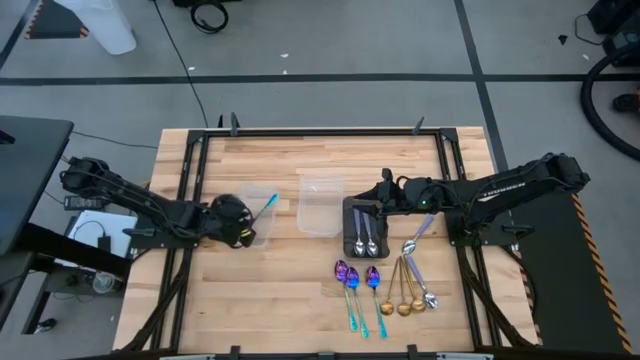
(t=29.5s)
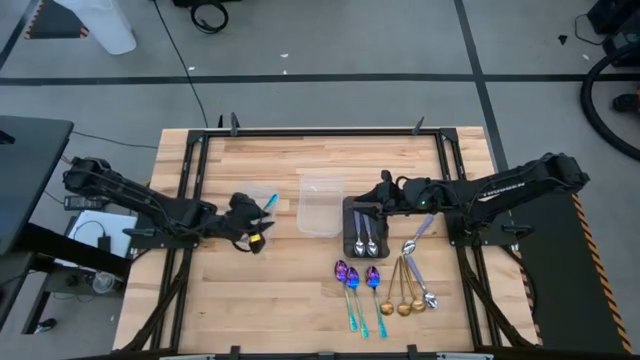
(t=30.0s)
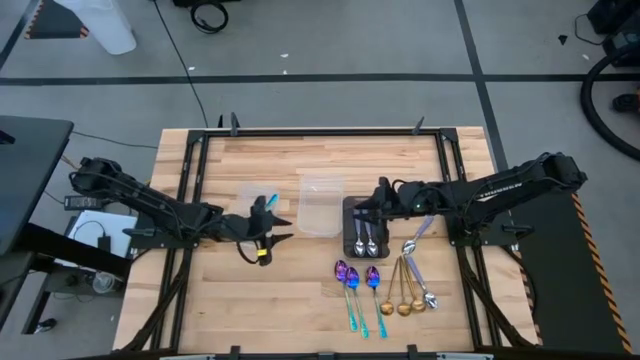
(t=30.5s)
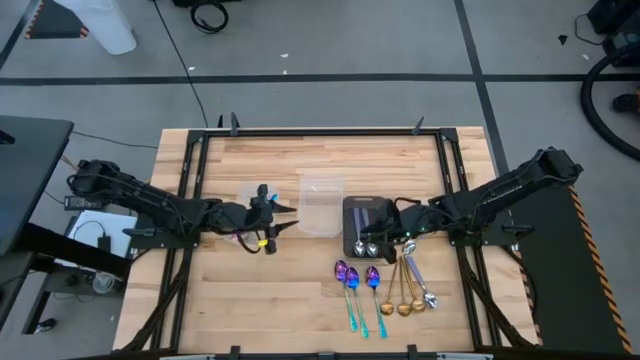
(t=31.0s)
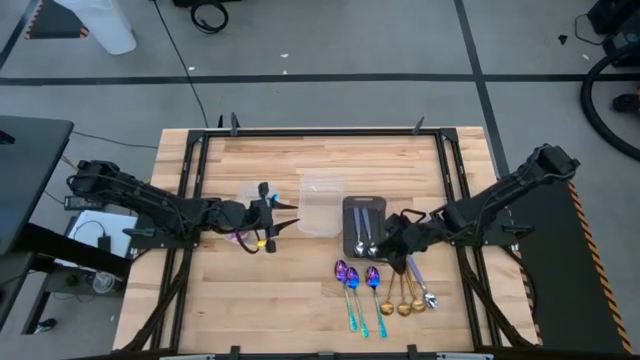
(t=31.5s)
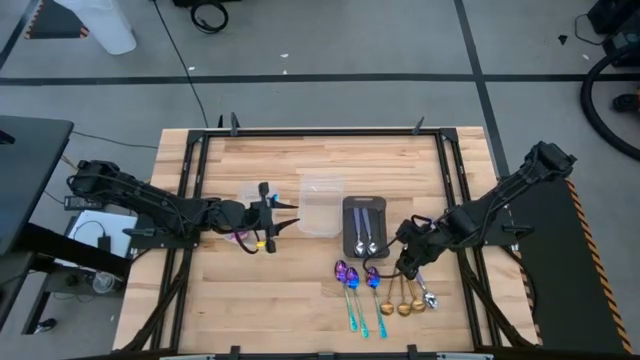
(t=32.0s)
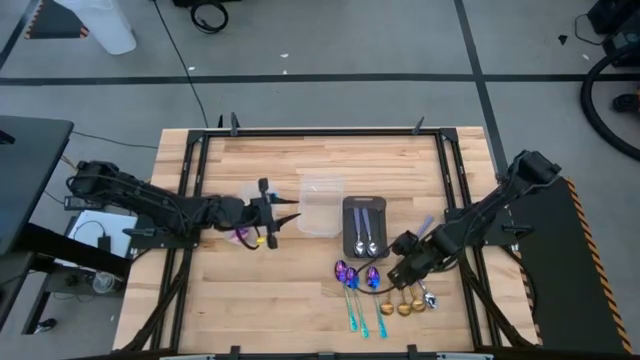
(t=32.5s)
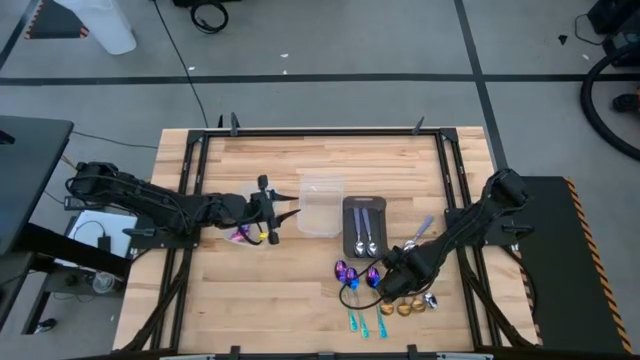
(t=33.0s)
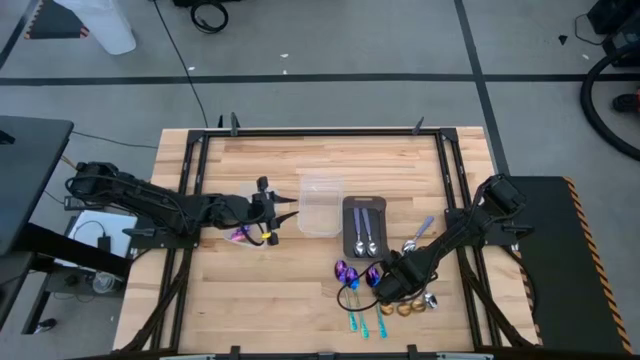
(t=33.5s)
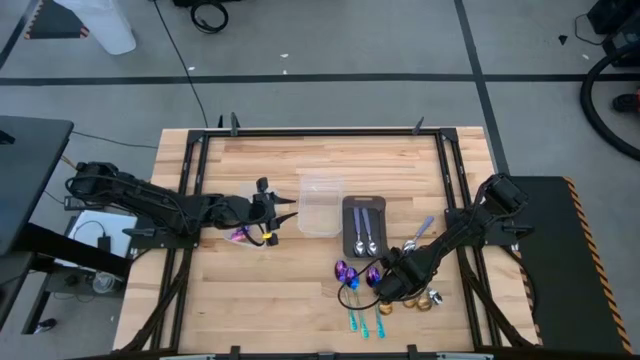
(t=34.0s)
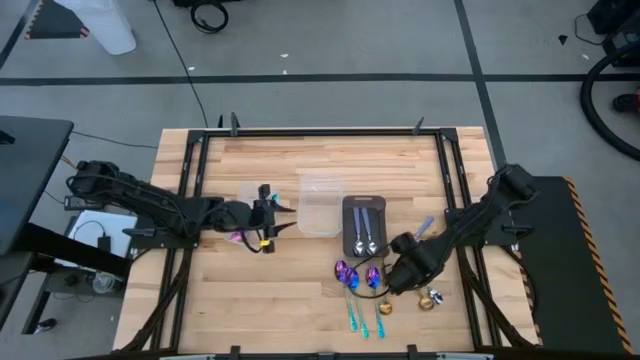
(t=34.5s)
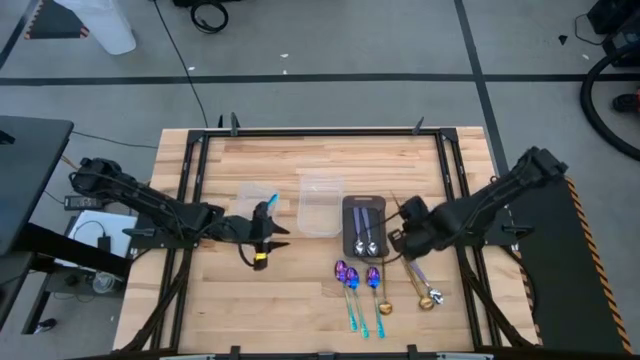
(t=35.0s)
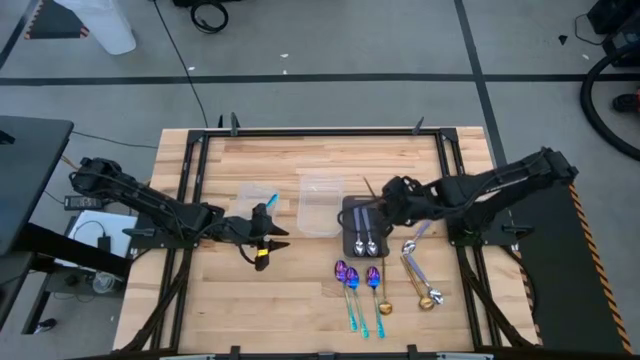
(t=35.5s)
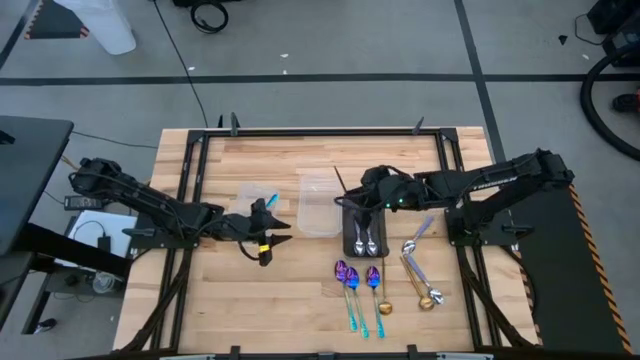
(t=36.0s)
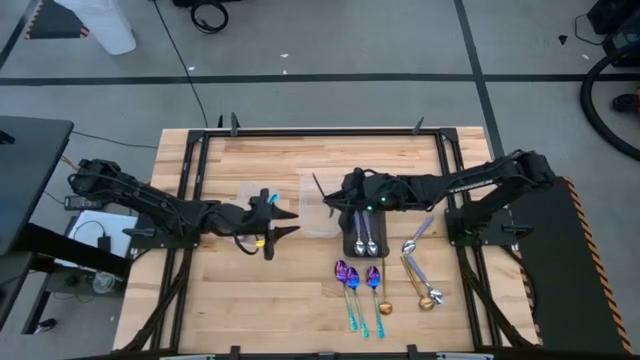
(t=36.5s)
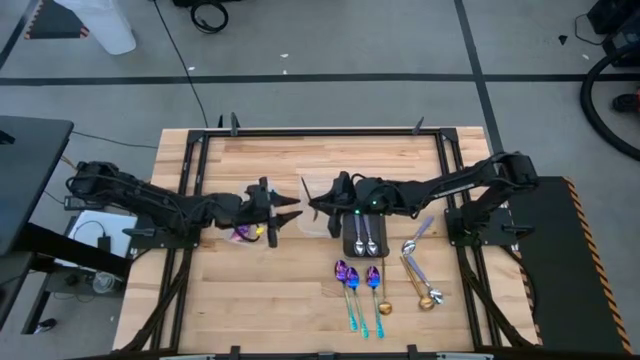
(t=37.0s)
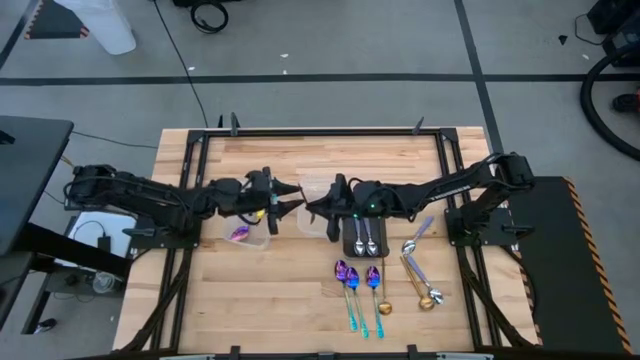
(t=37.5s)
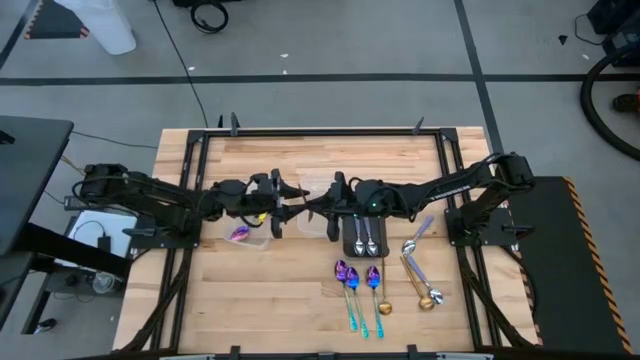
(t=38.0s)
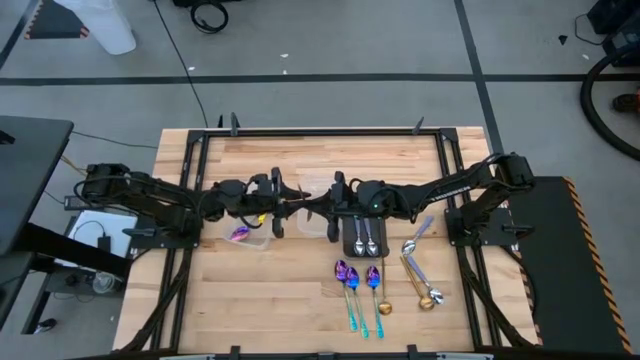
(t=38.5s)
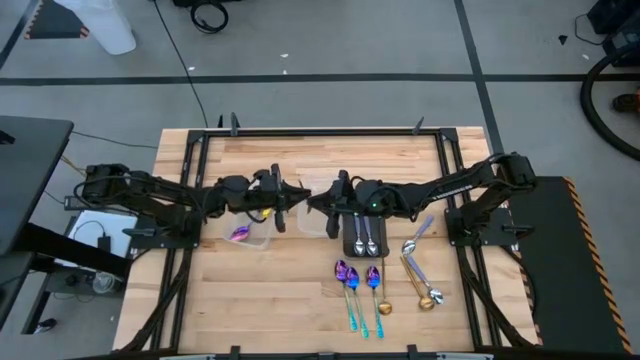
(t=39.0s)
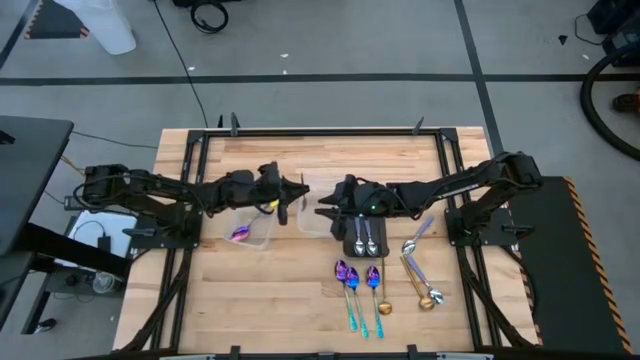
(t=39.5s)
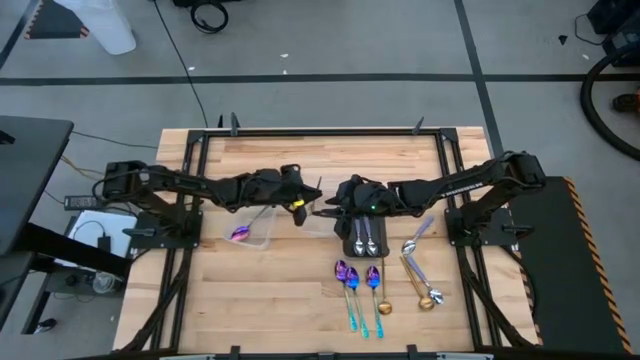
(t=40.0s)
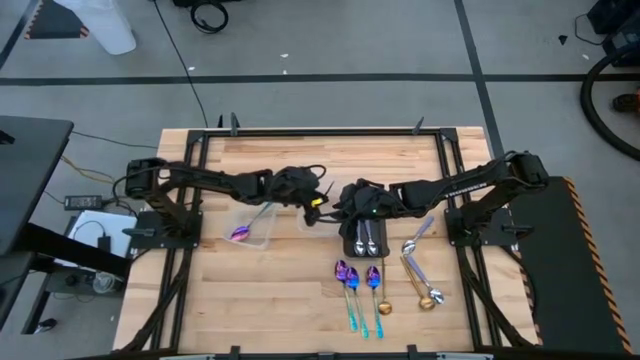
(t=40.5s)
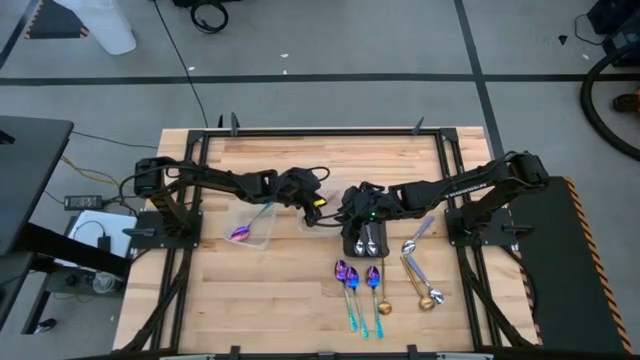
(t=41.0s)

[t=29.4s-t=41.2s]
Task: Sort silverware by color (type)
Put the gold spoon into the right transparent bin

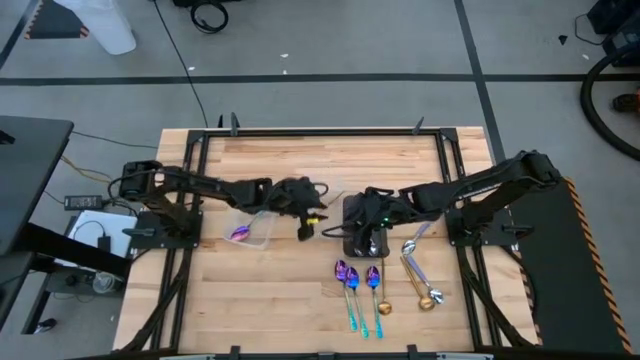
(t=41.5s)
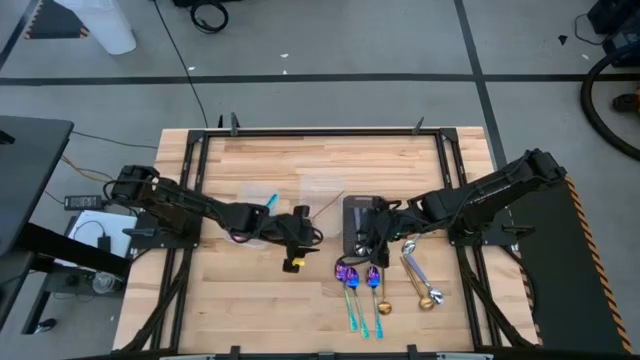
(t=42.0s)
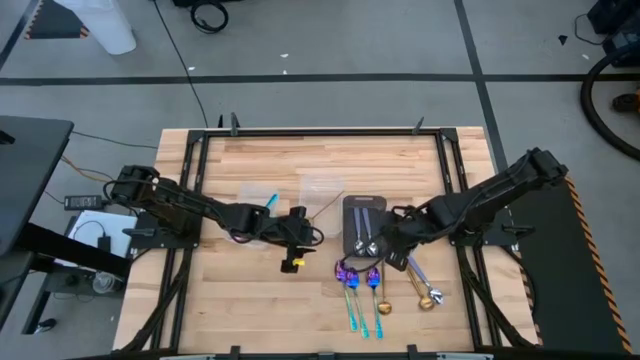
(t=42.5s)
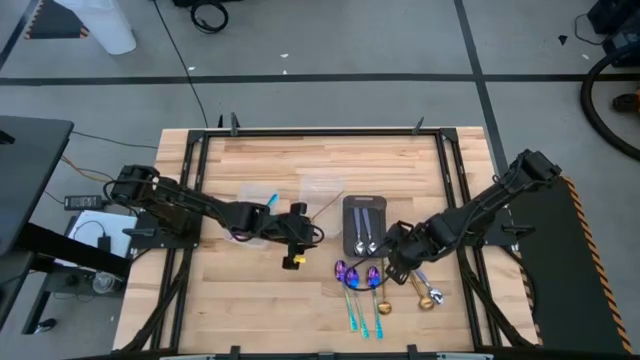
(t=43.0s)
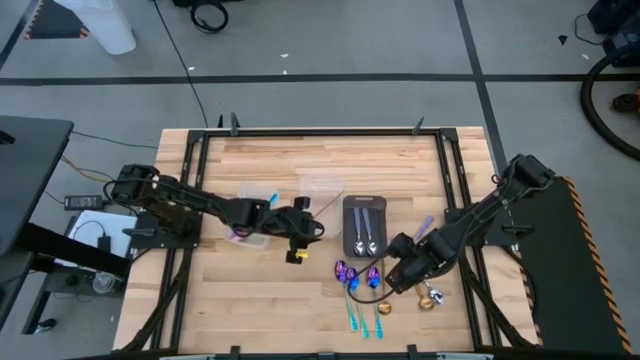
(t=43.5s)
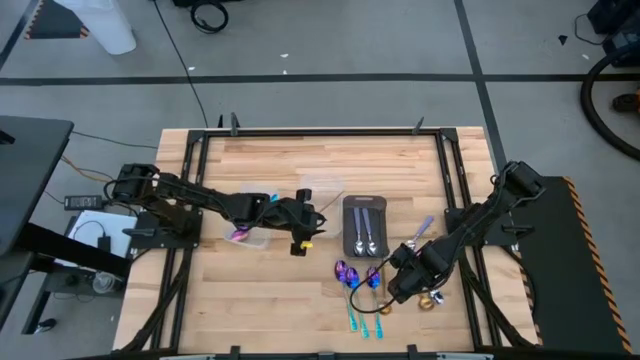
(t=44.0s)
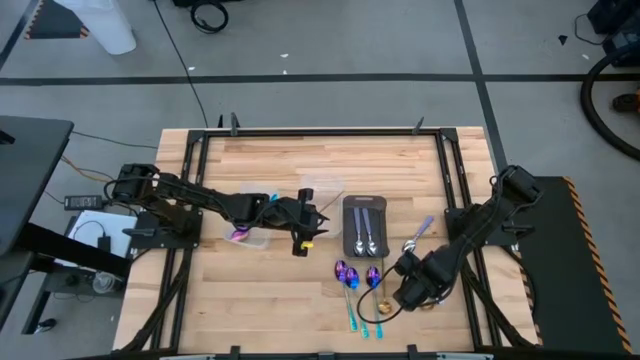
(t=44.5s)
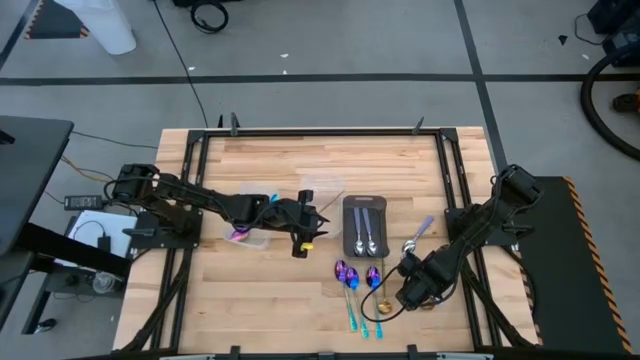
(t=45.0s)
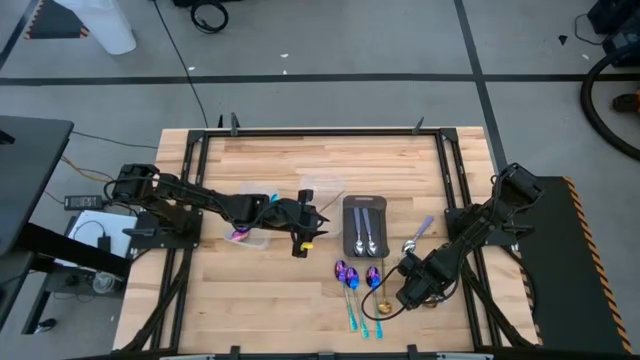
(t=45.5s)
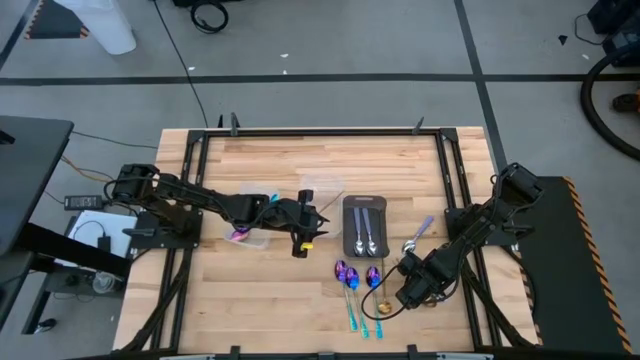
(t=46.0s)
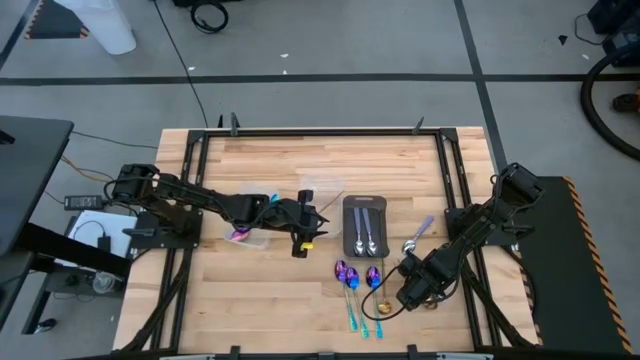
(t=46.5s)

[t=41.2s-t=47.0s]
Put the gold spoon into the right transparent bin
